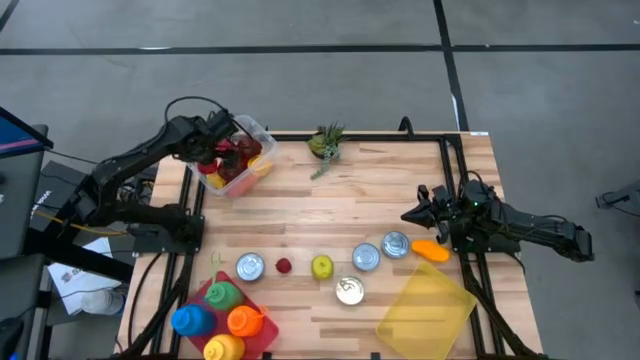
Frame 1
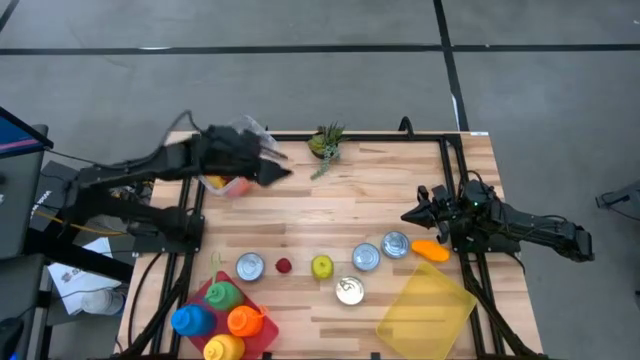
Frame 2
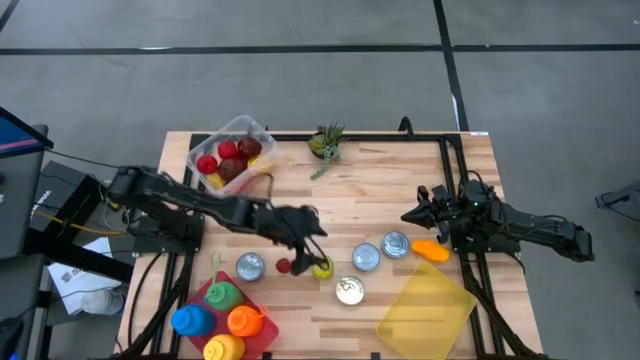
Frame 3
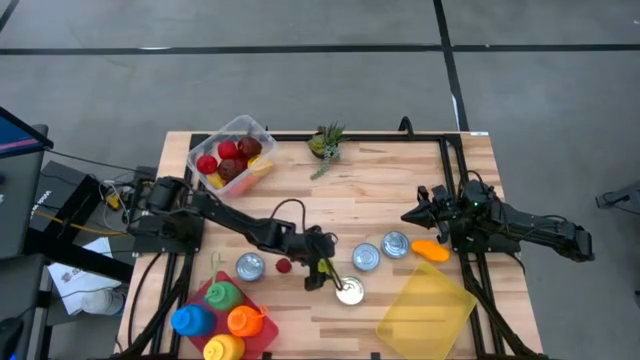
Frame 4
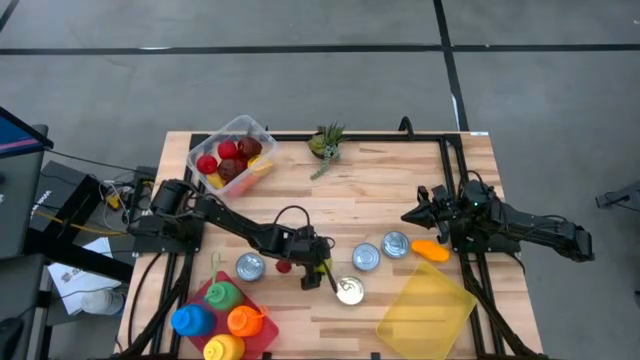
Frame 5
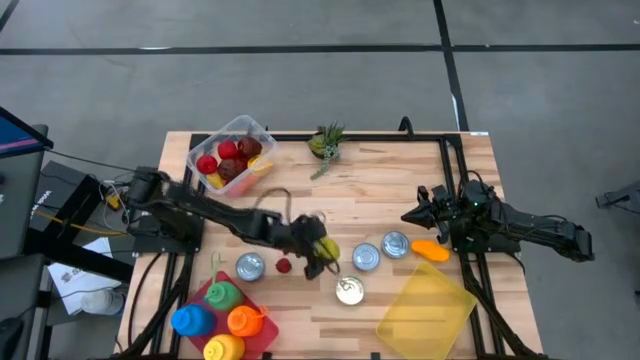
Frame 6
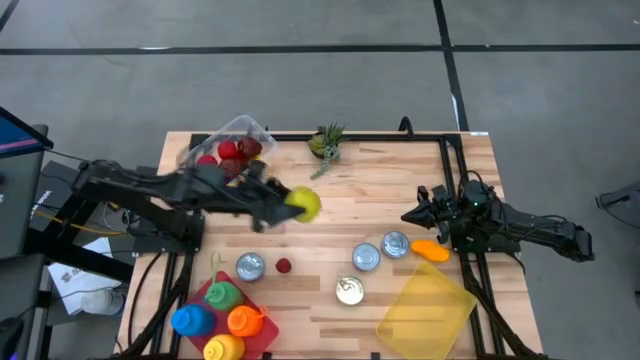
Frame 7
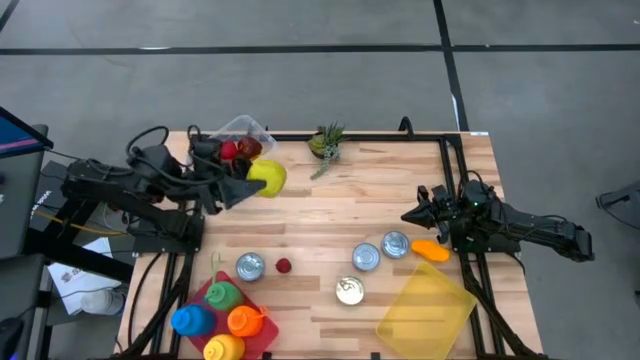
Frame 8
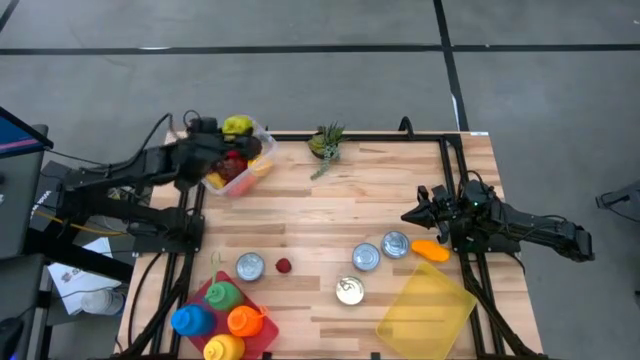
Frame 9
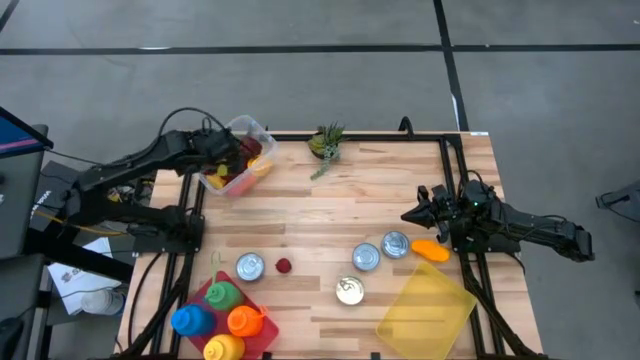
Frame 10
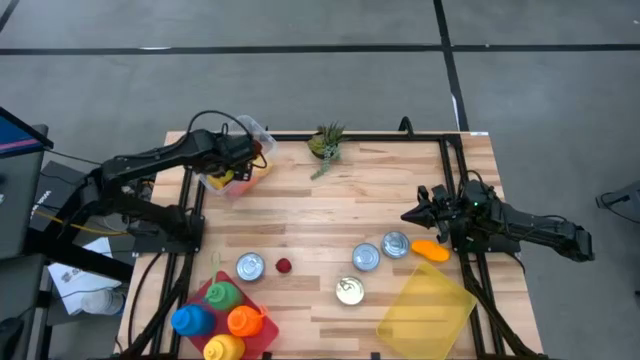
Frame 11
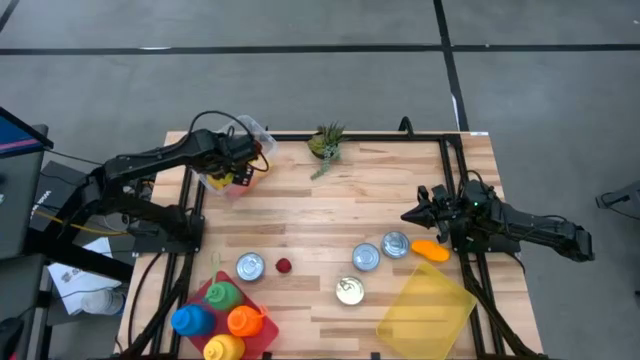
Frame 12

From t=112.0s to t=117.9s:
Task: Pick & Place Food Item
Put the green apple into the transparent bin

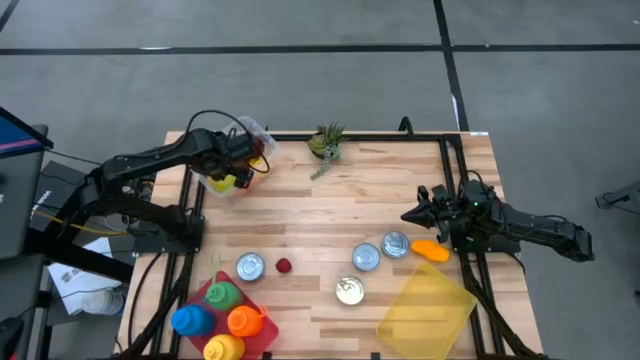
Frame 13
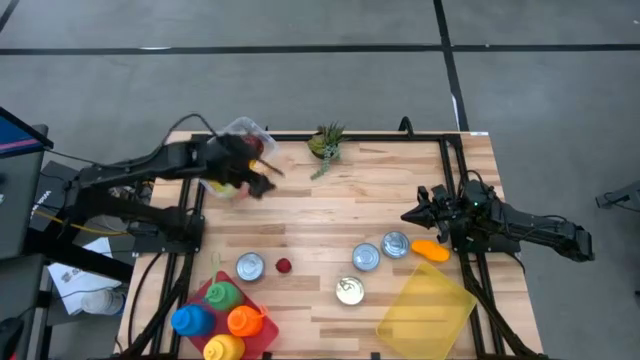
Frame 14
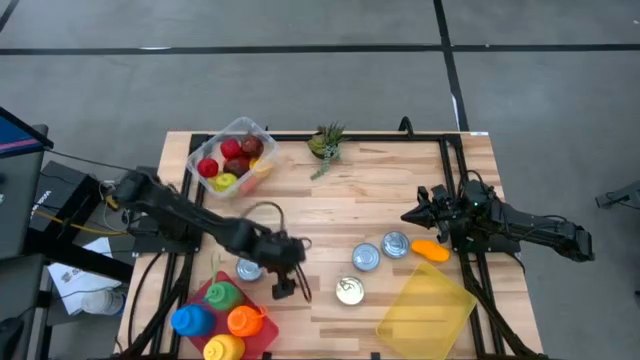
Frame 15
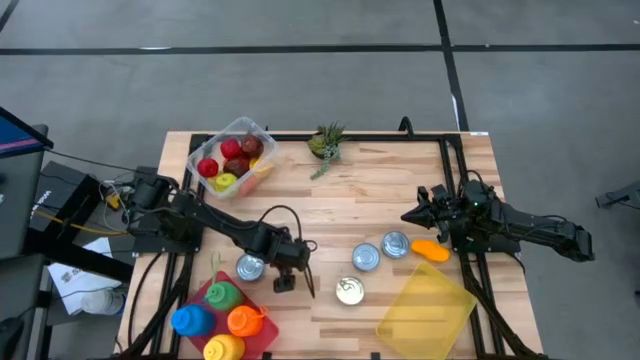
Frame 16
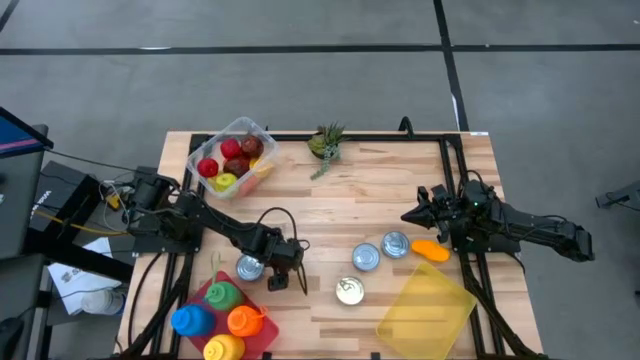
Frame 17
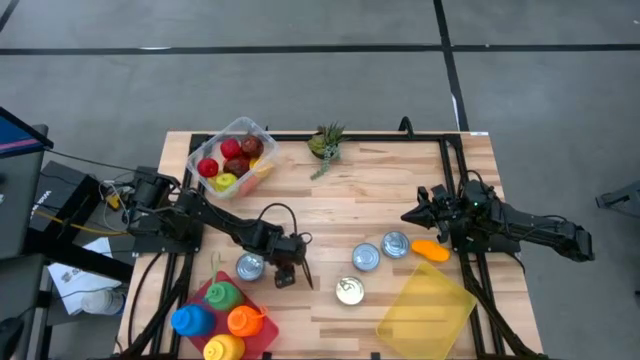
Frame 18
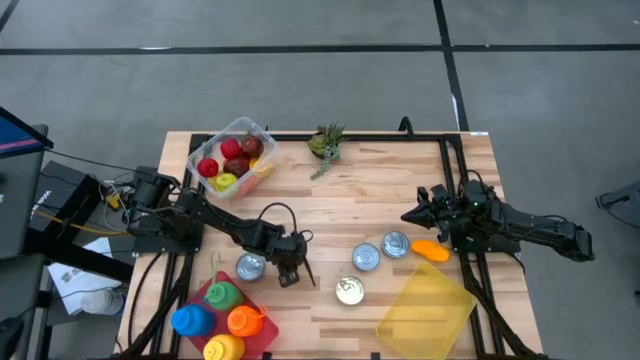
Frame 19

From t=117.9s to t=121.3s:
Put the red pomegranate into the transparent bin

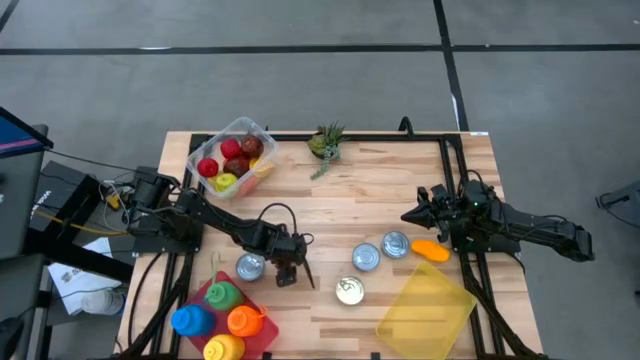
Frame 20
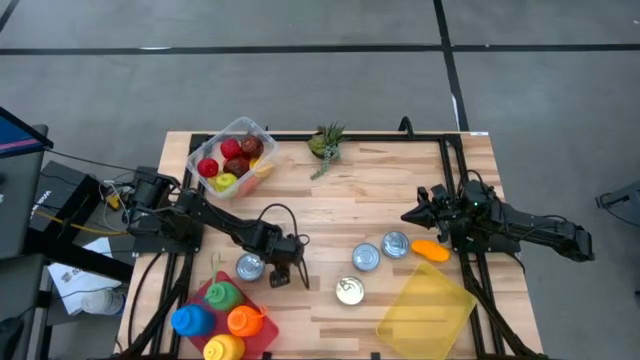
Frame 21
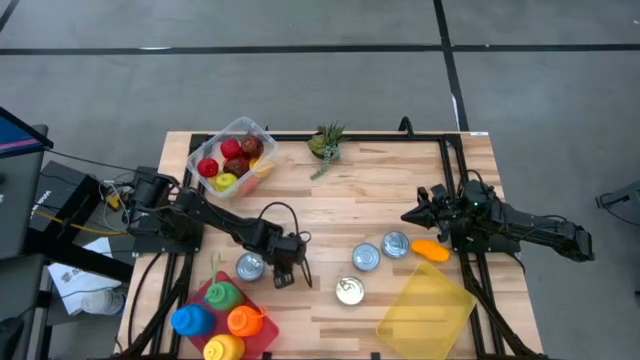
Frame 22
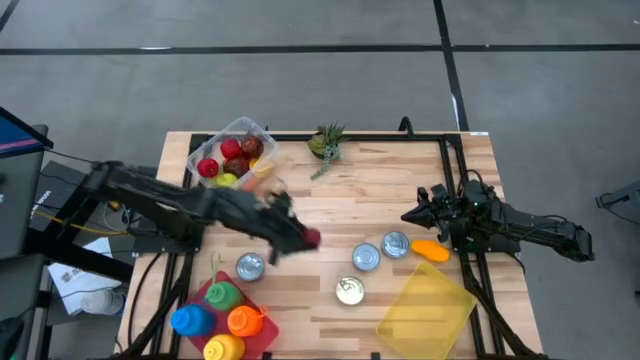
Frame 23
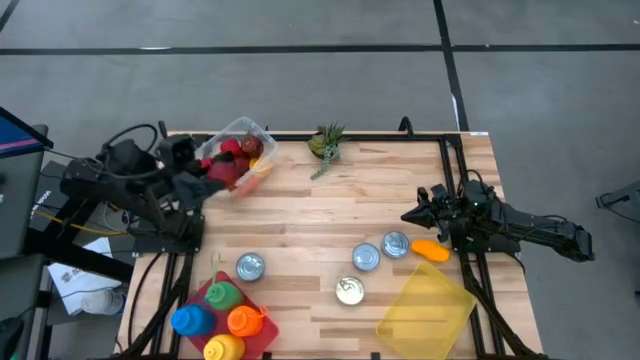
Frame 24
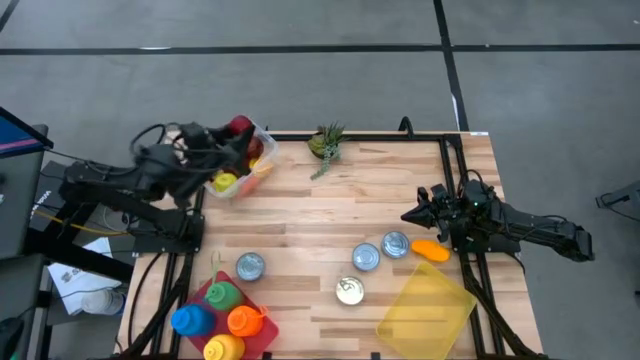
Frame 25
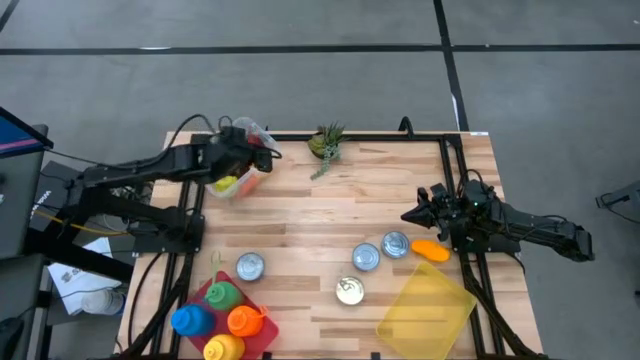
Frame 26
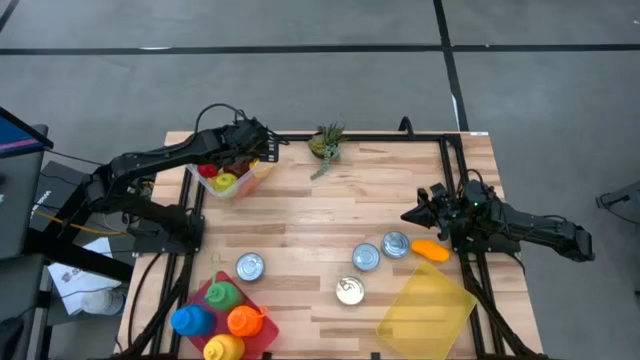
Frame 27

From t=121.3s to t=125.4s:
Put the red pomegranate into the transparent bin

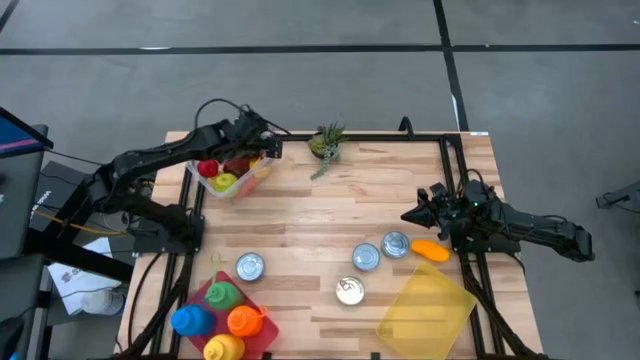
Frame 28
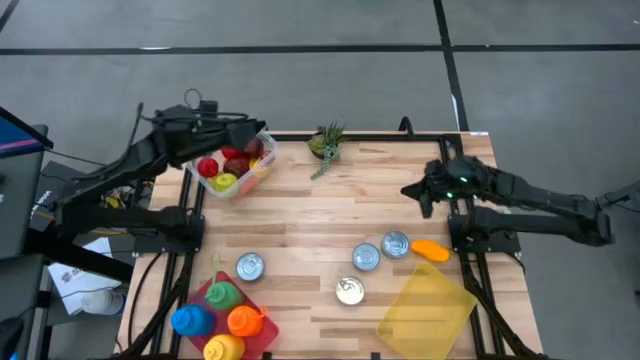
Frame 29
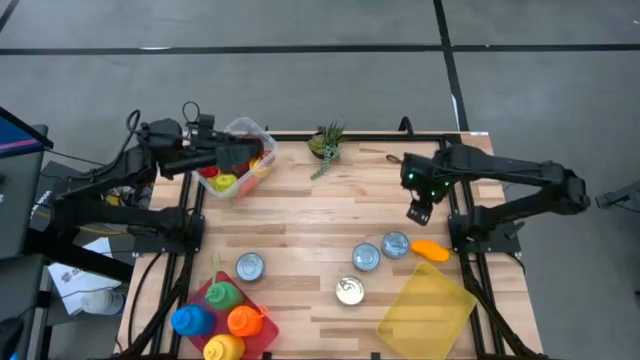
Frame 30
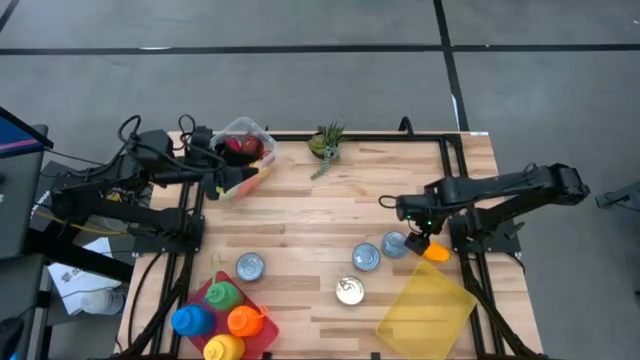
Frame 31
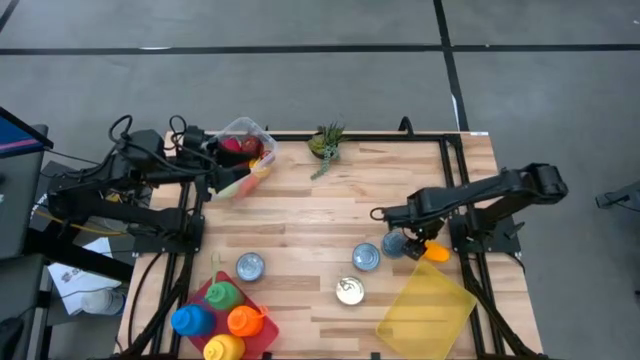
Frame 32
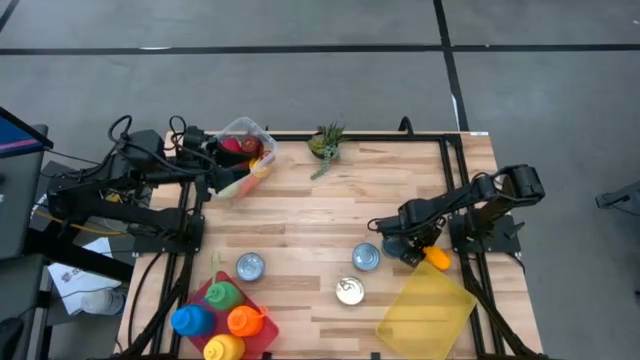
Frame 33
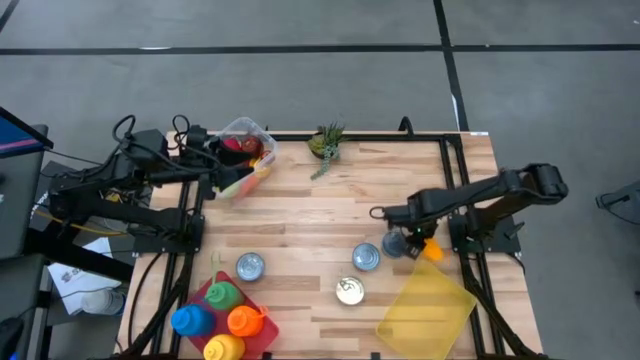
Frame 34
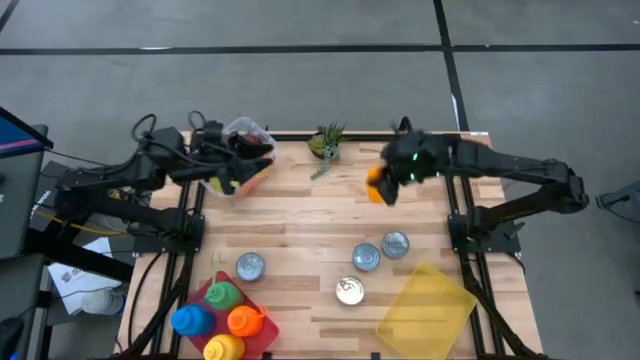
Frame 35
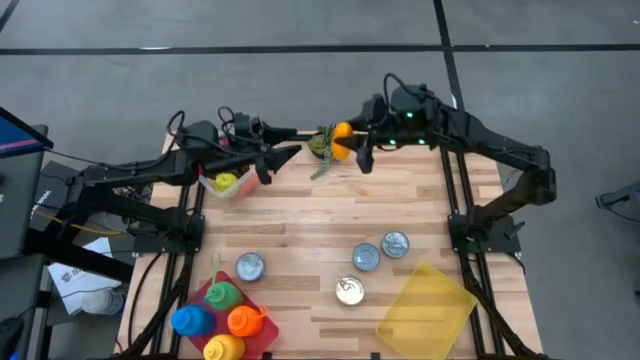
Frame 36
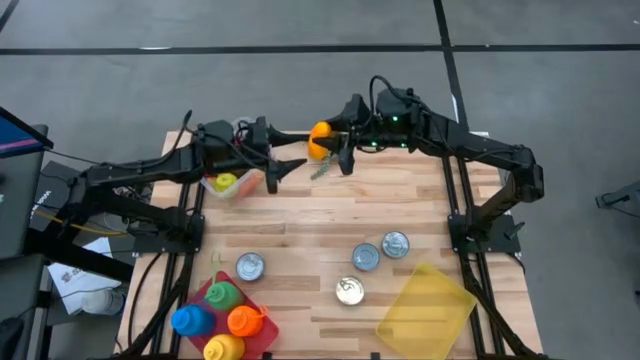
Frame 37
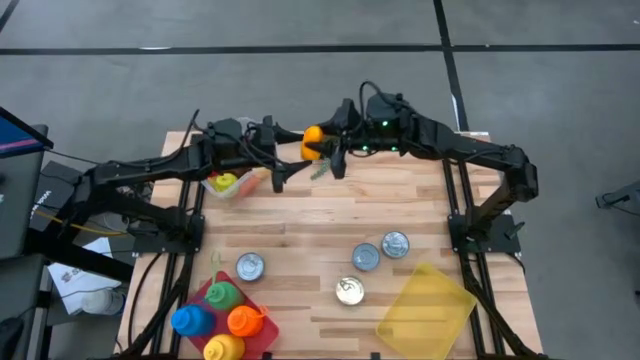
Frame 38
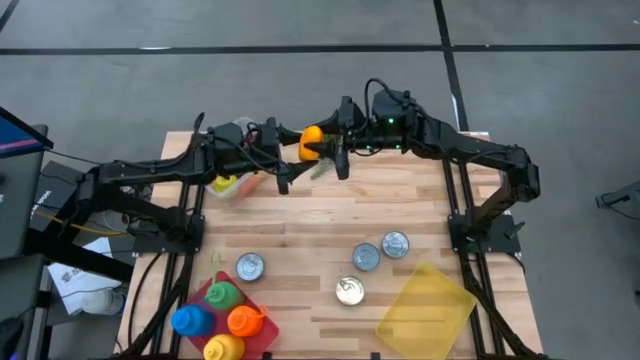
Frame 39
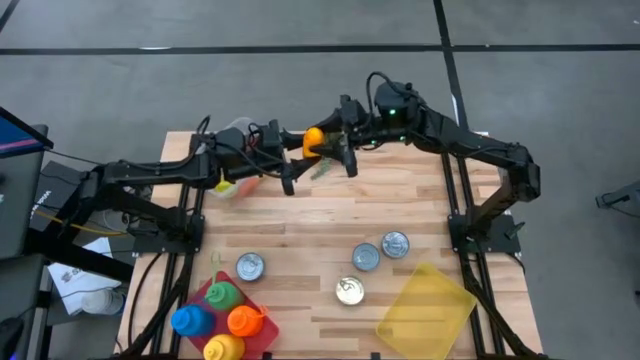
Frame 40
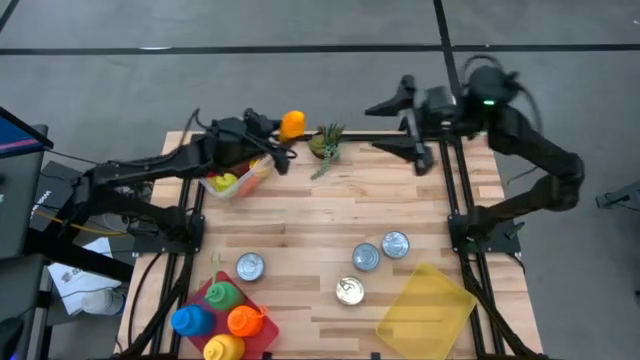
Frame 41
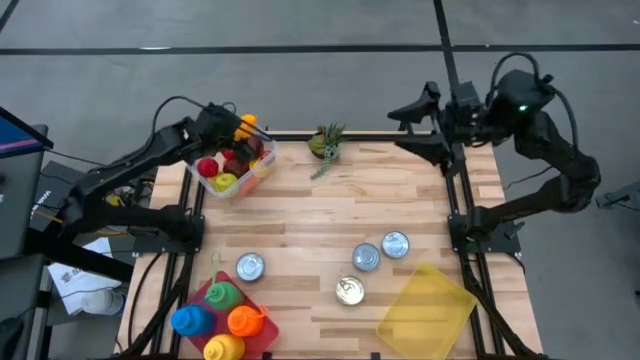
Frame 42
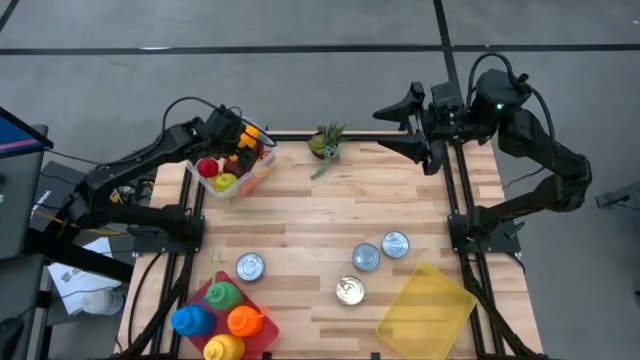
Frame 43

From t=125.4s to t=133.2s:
Put the yellow mango into the transparent bin
